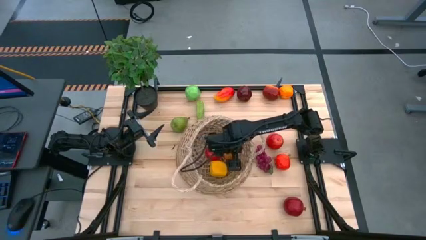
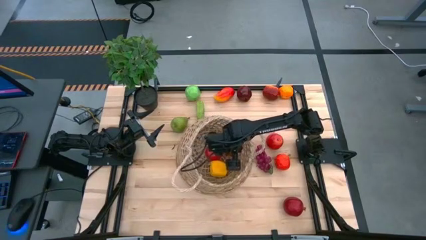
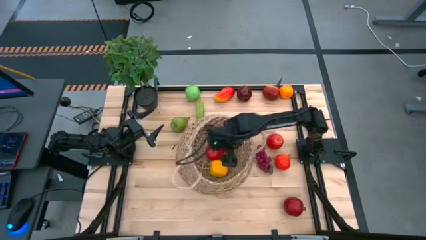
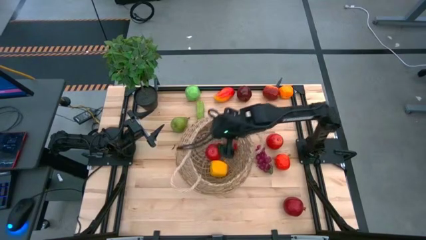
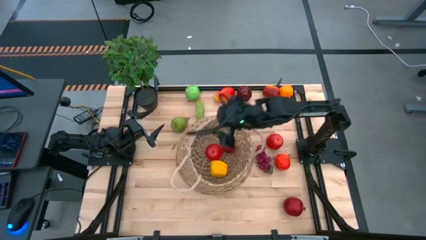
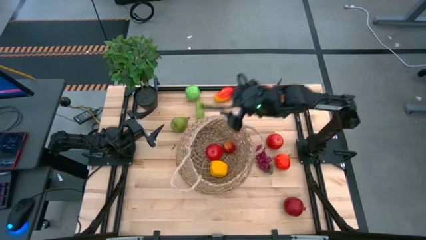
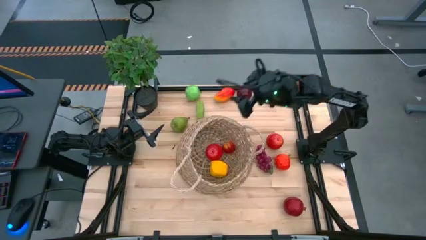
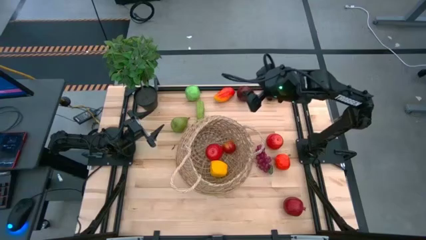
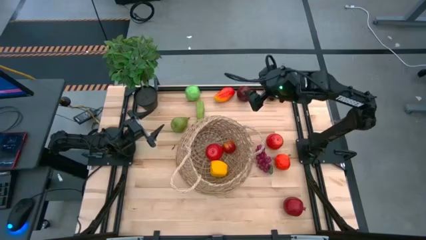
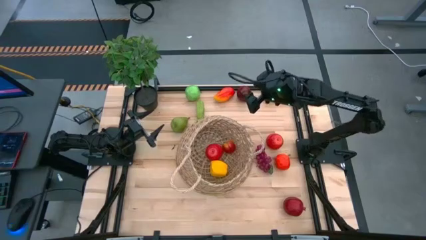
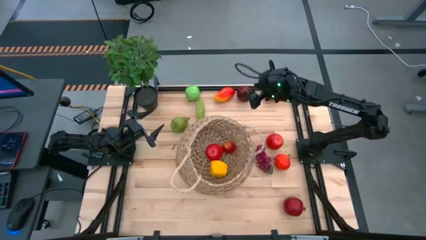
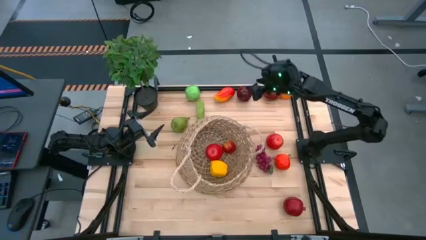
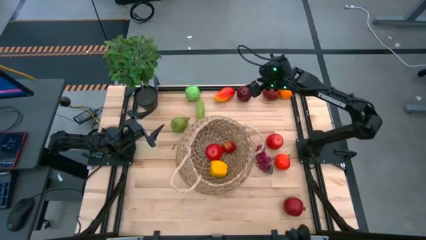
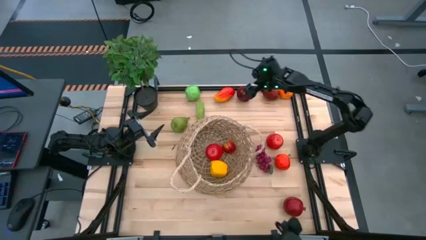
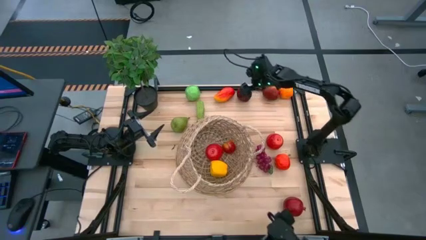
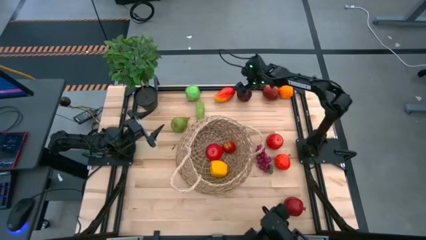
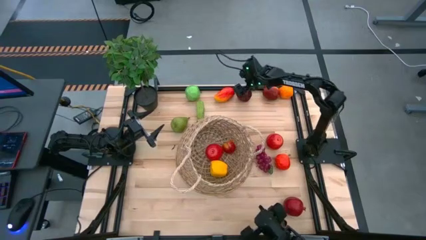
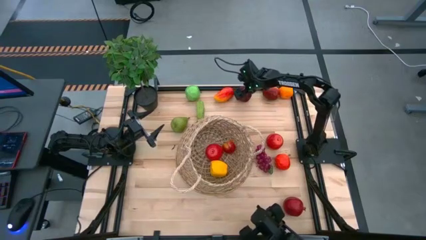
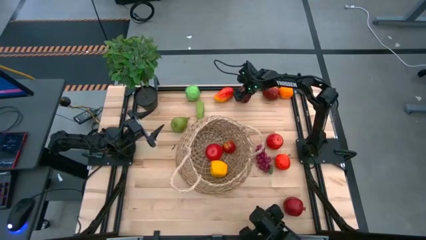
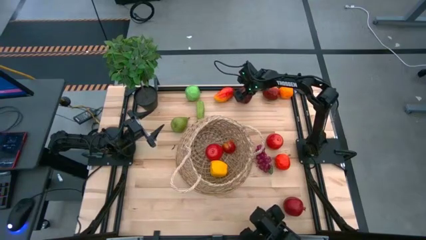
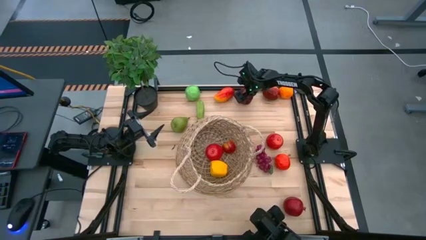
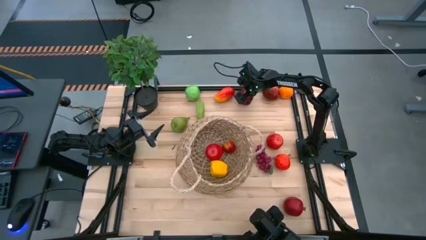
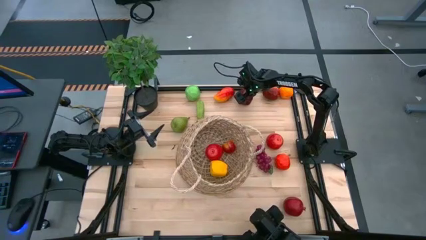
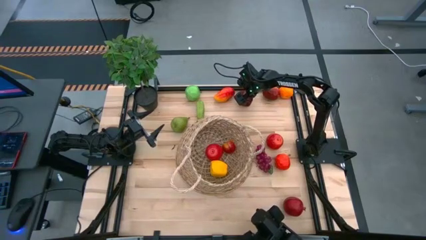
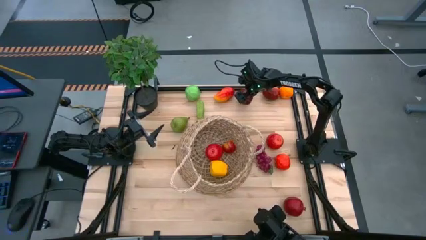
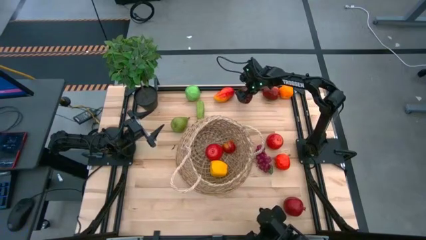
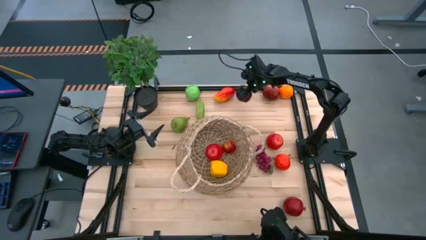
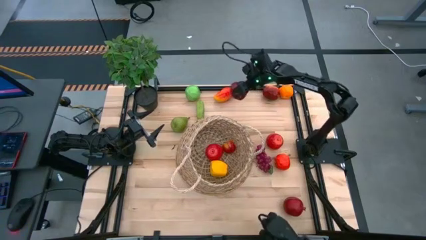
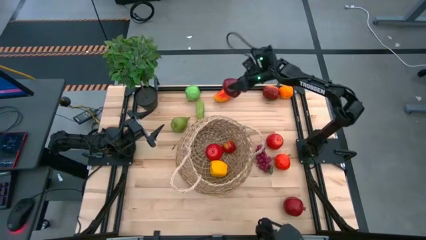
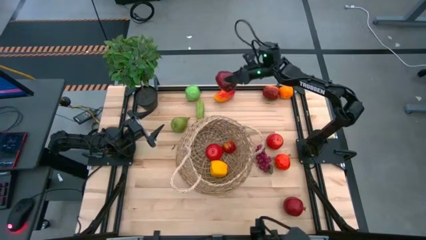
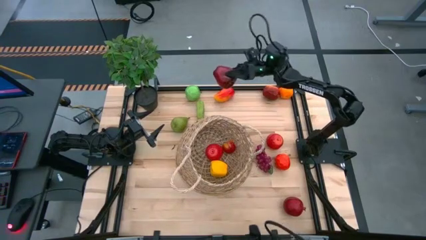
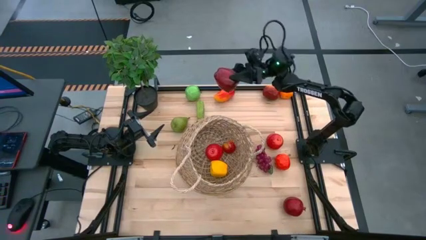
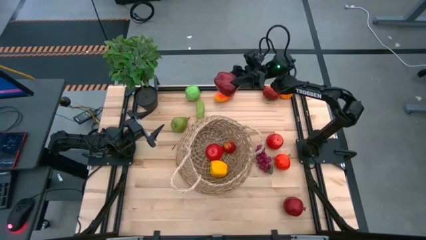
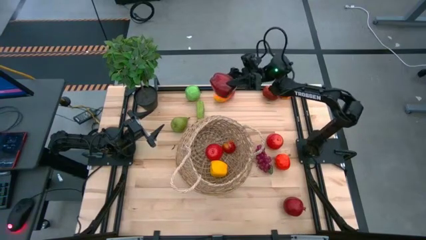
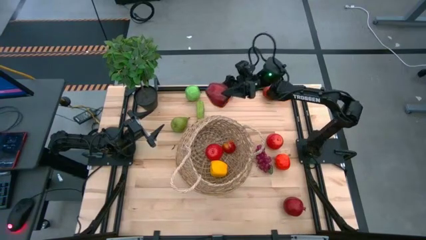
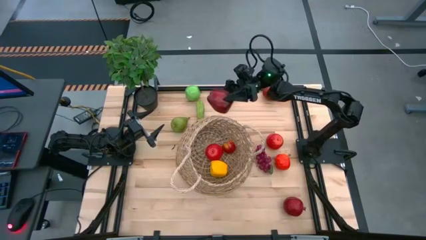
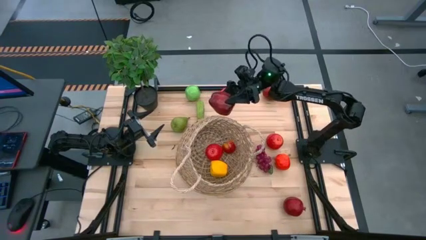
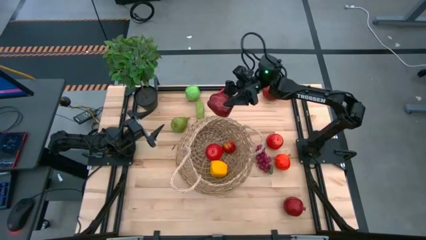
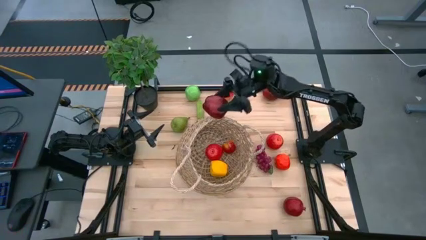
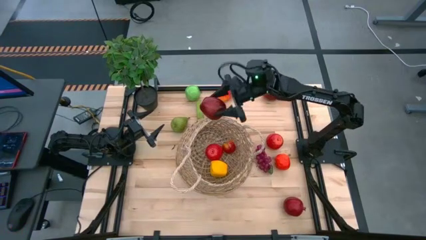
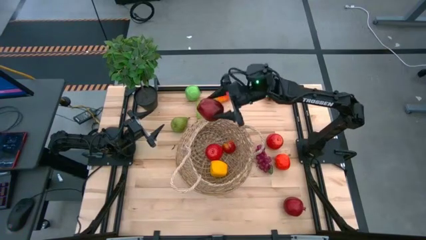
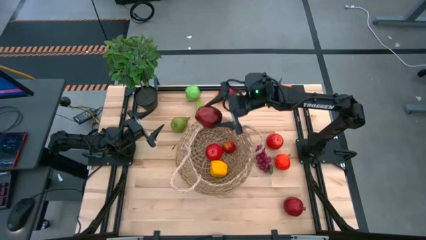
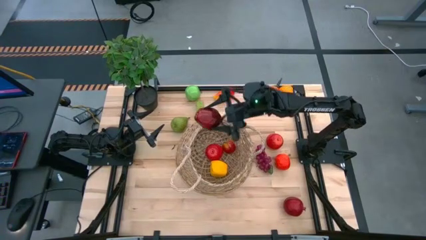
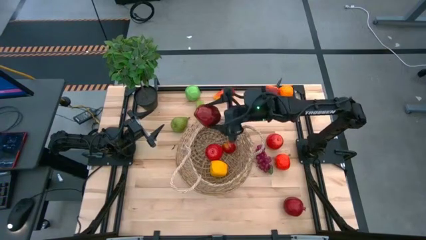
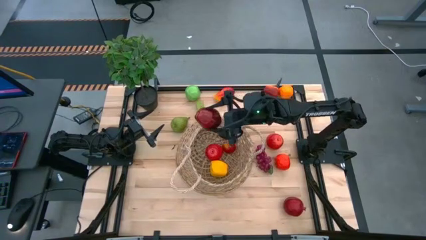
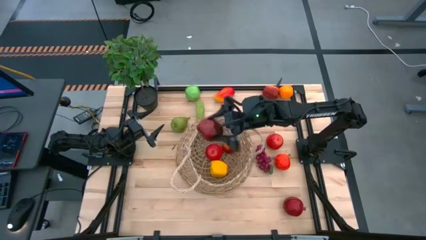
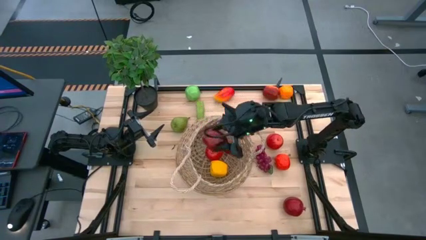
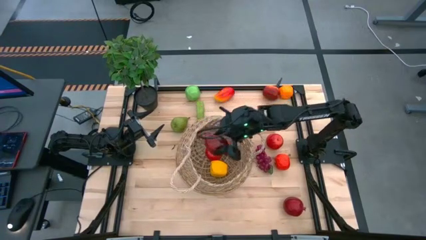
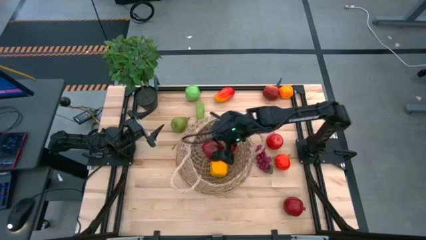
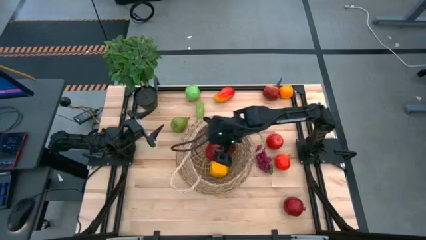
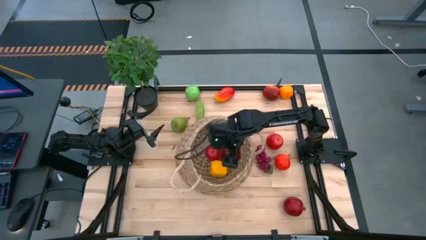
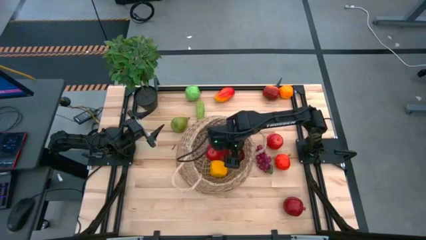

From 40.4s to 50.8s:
Task: Build produce basket
Put the red apple into the woven basket

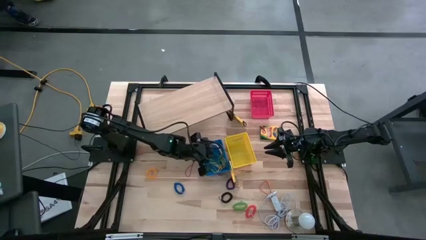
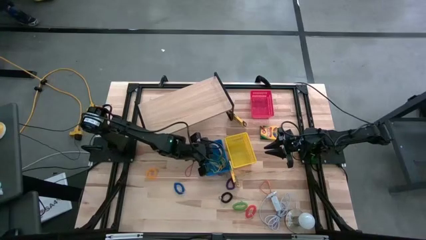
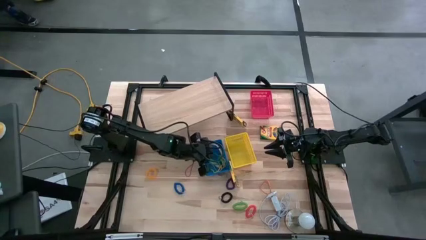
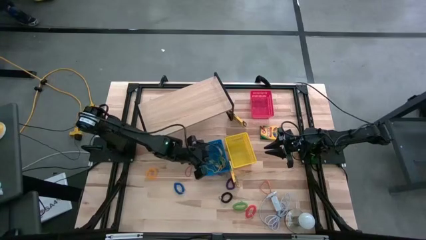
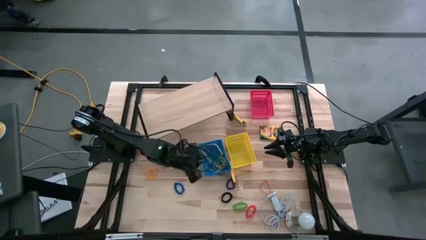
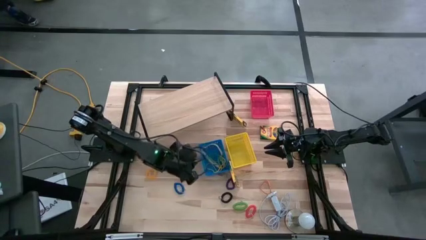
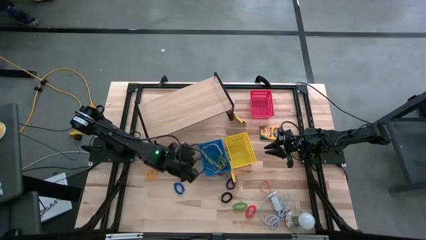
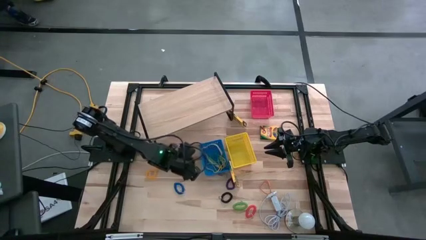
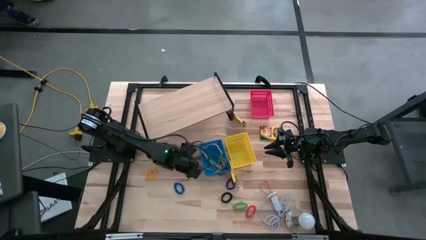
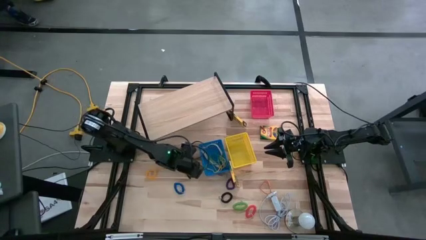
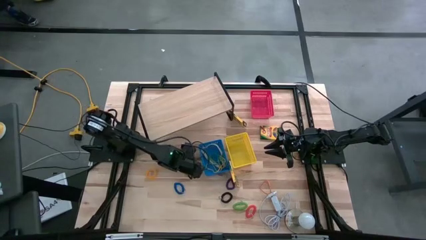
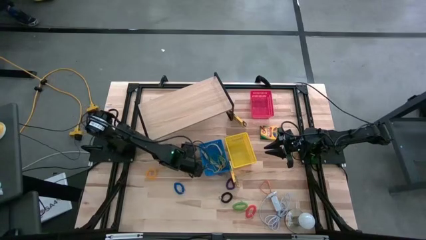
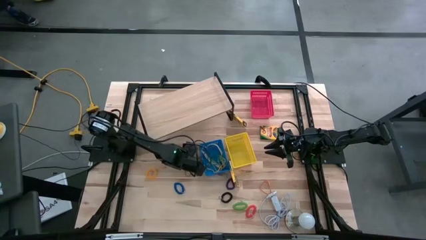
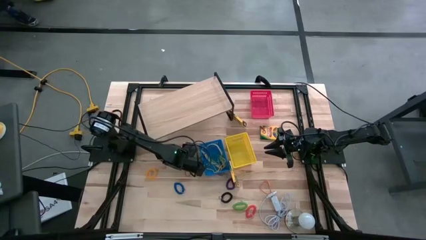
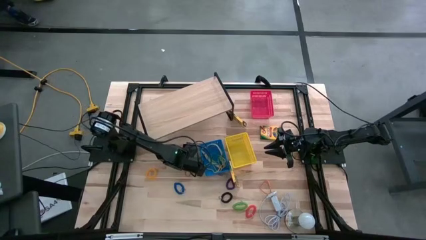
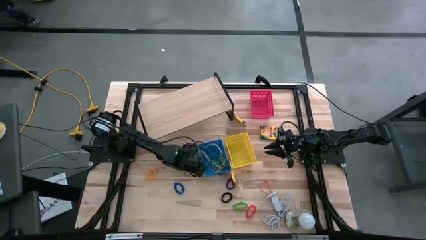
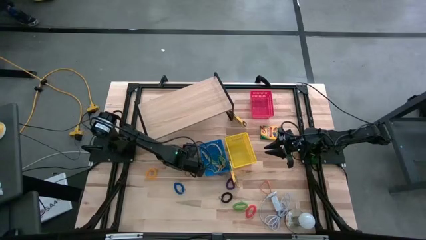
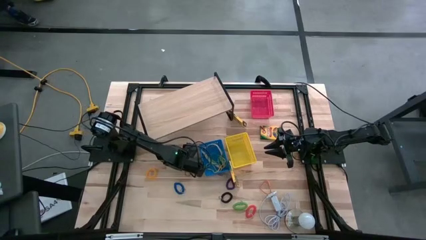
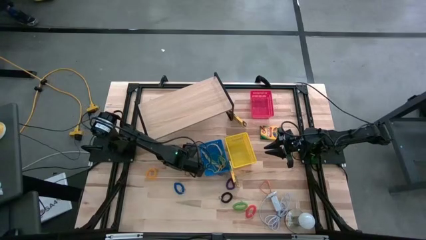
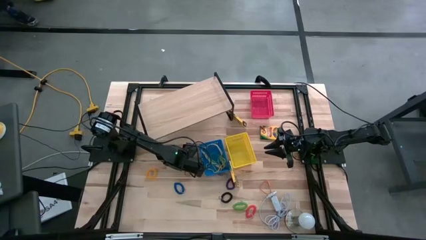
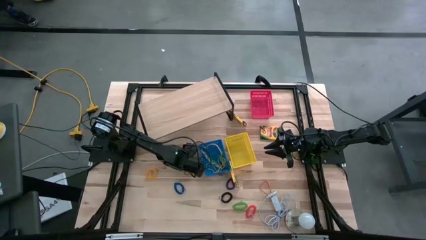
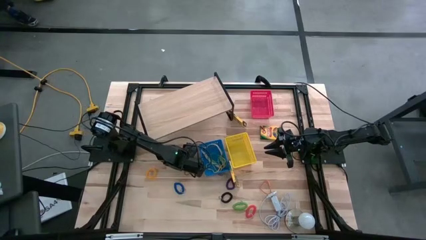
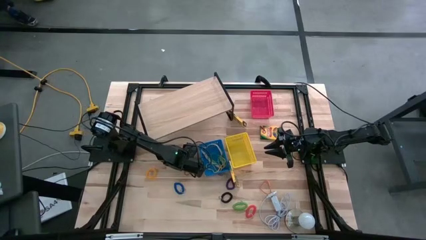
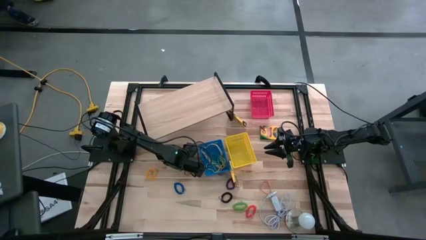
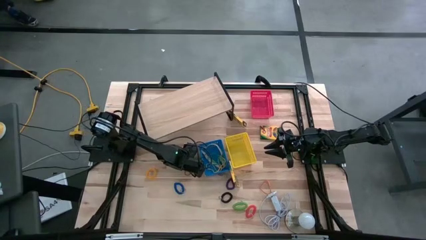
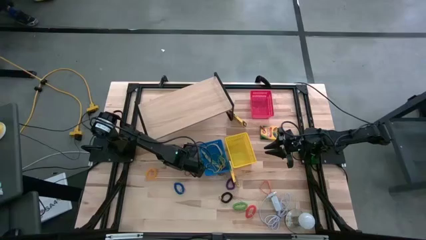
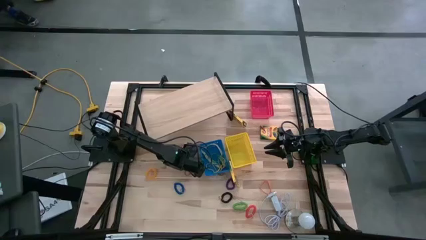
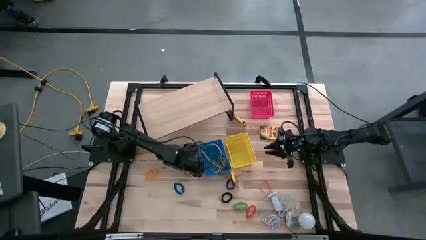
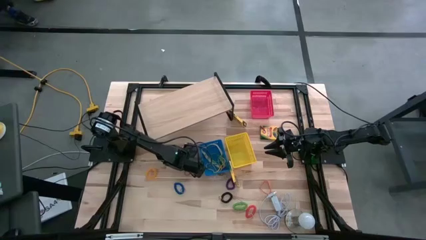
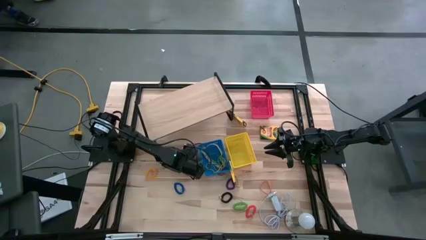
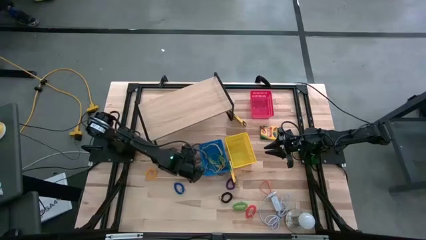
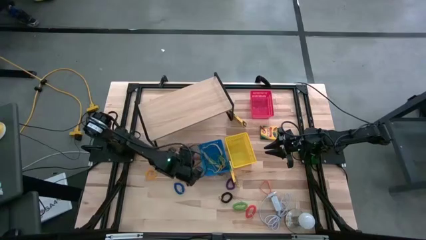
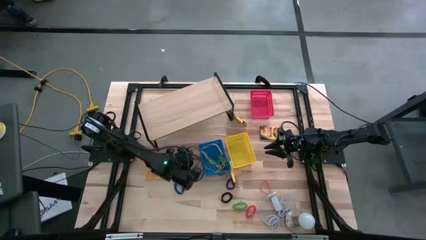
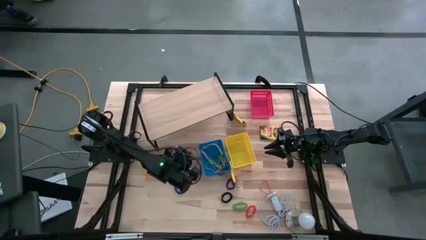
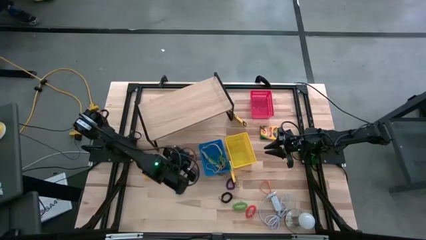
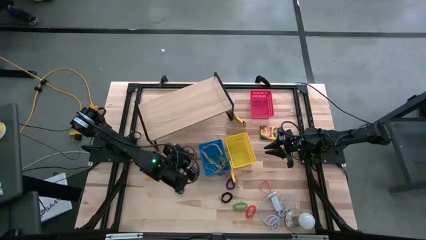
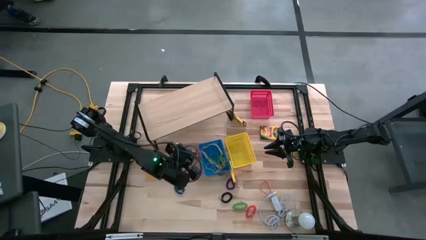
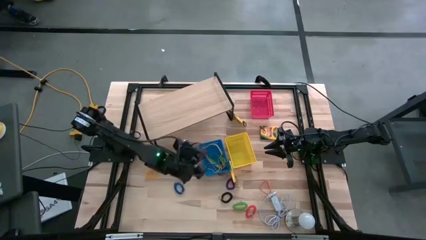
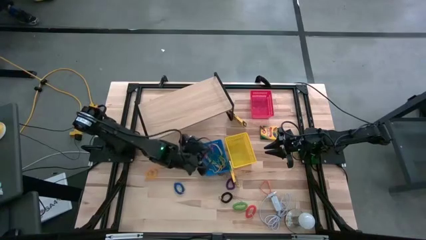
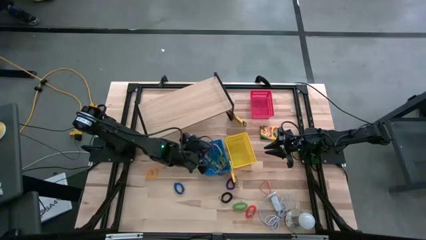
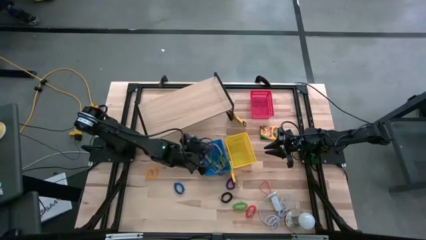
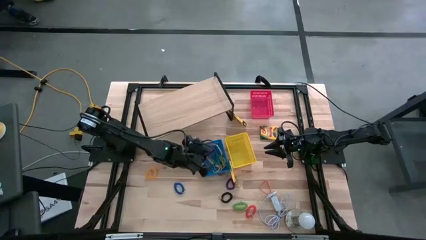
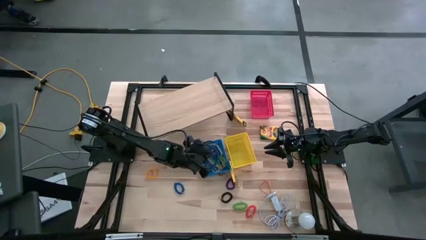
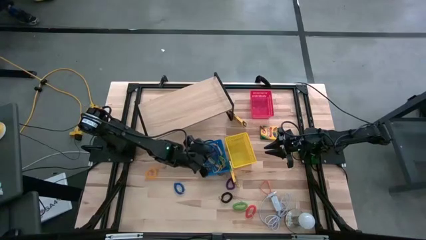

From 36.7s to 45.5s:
Task: Pick & Place Office Desk Supplies
Put the red rubber band into the blue bin
